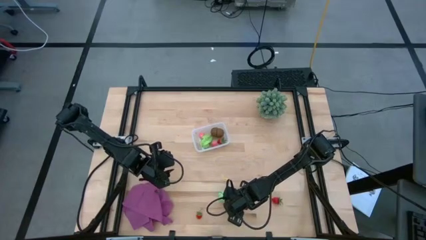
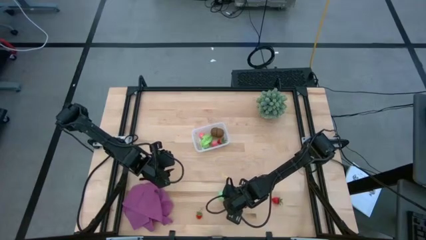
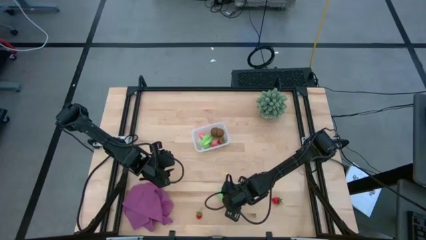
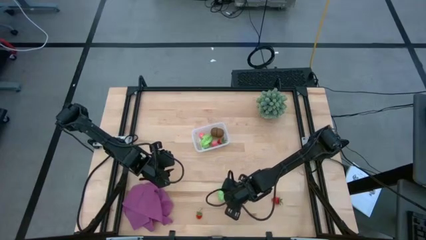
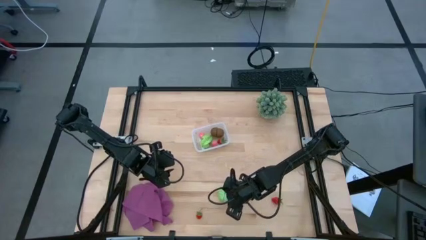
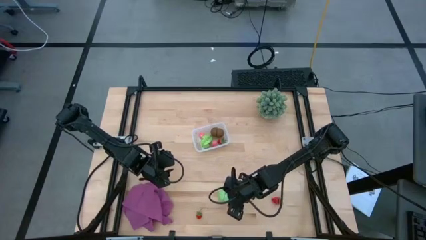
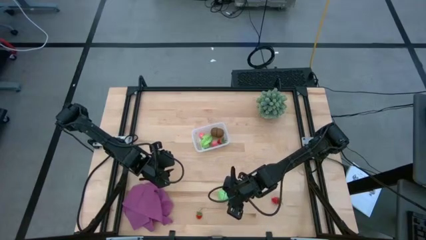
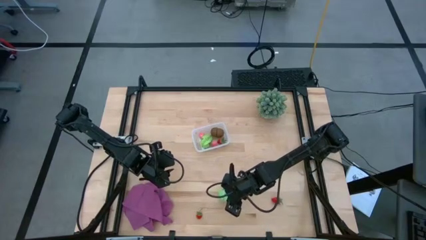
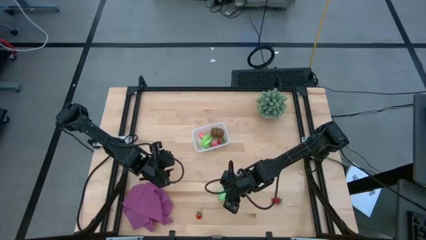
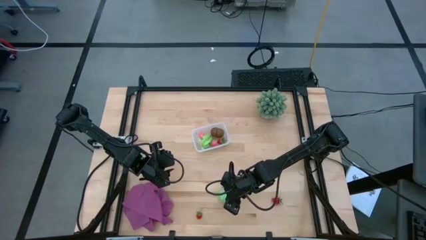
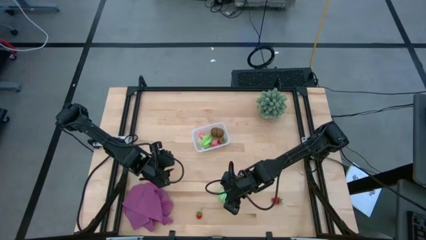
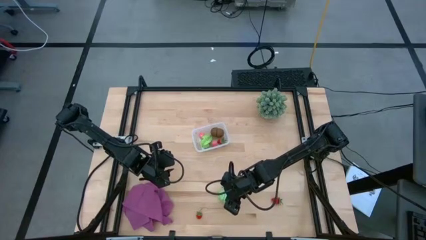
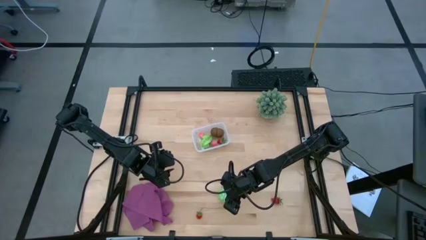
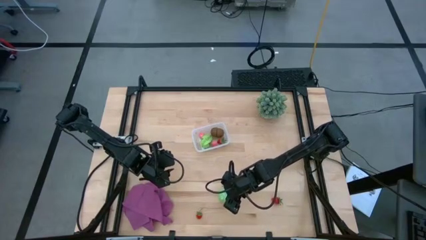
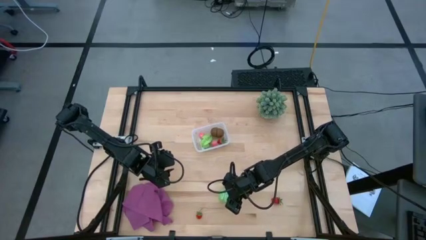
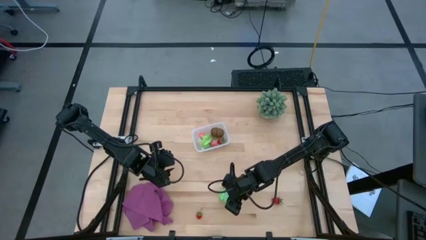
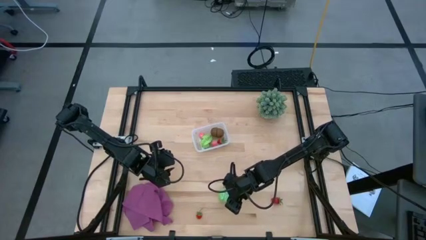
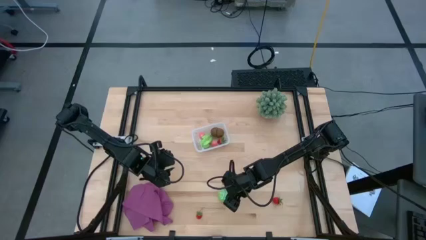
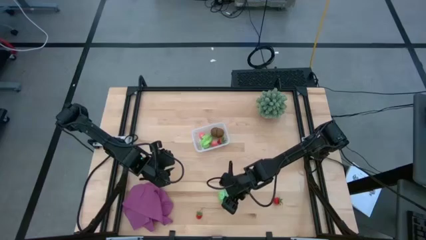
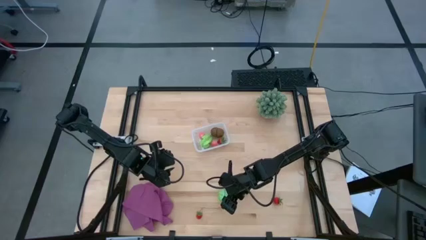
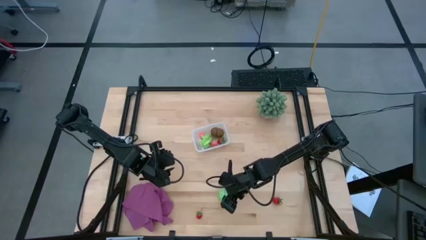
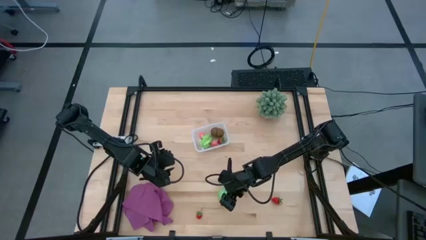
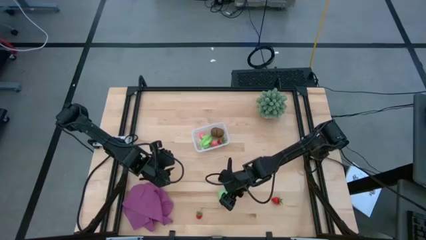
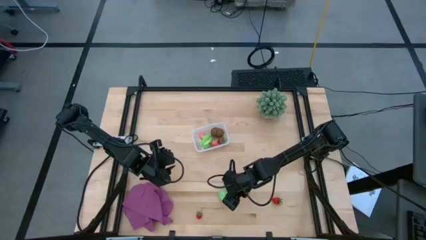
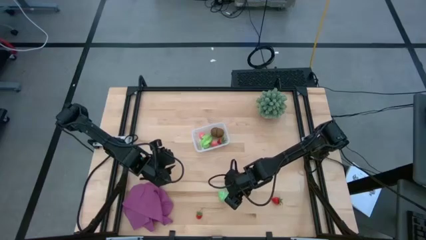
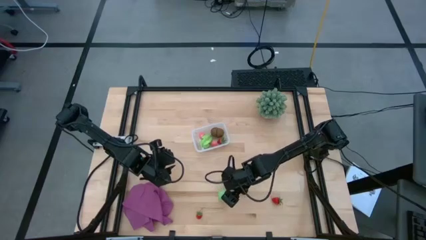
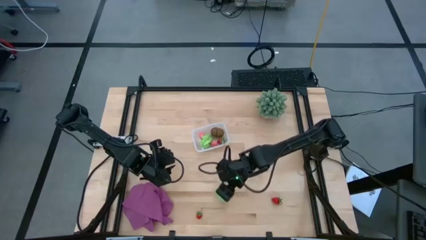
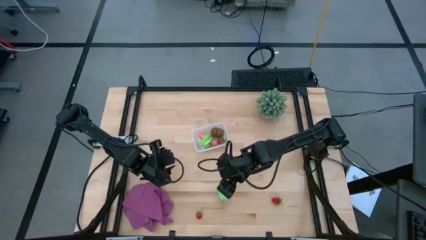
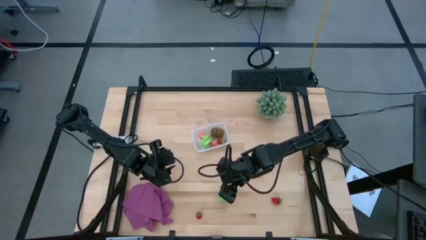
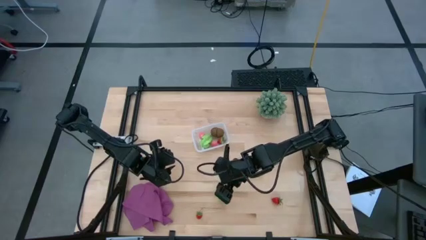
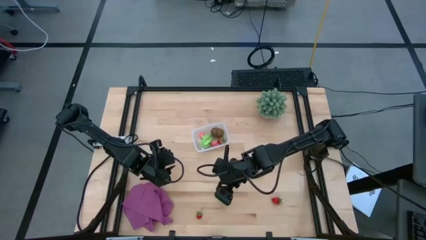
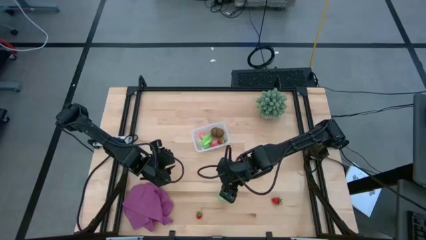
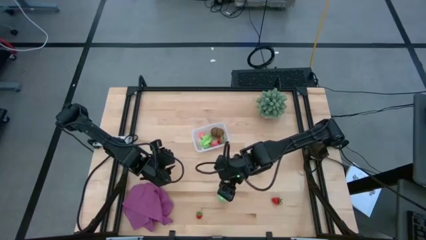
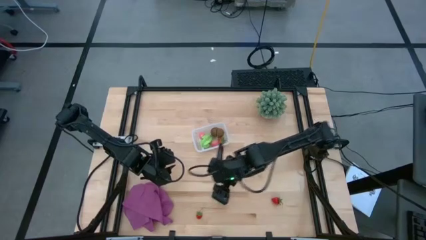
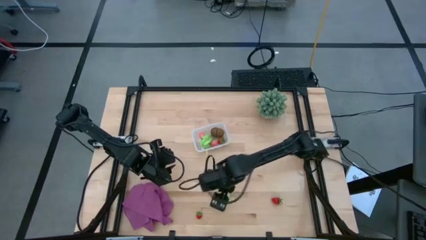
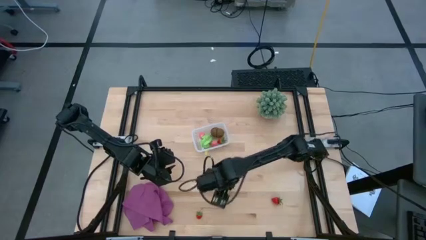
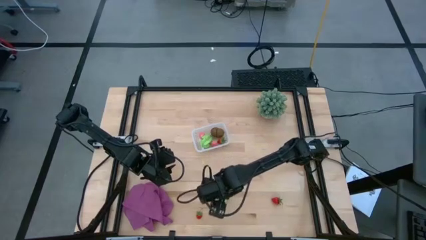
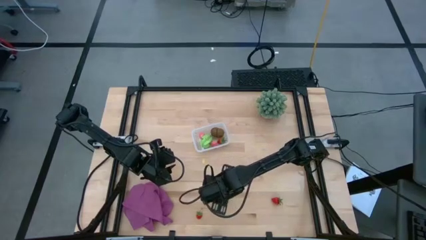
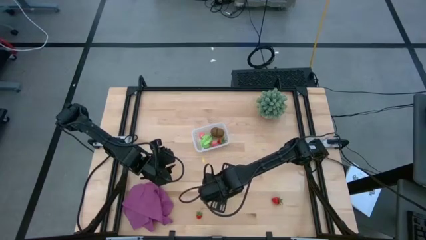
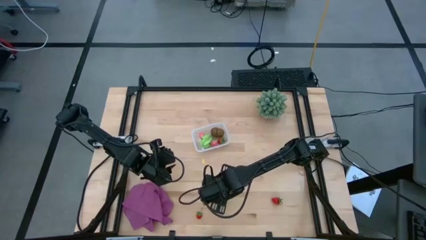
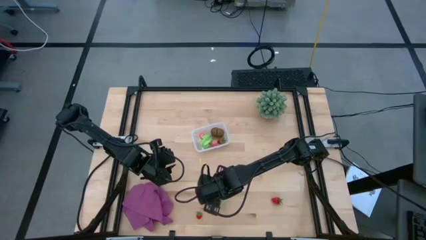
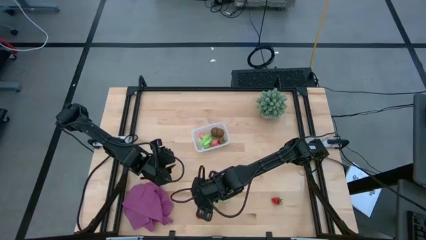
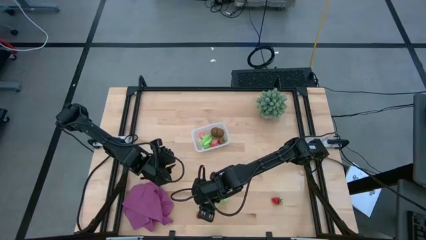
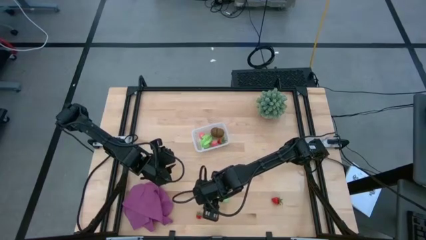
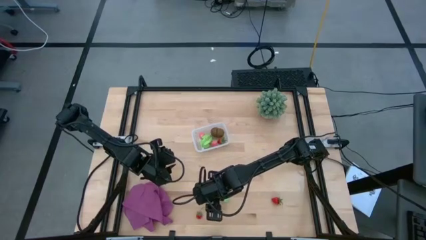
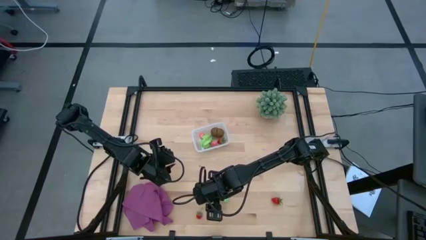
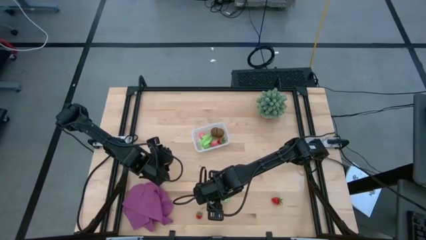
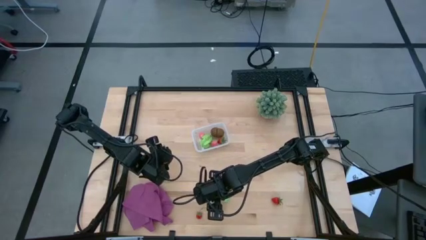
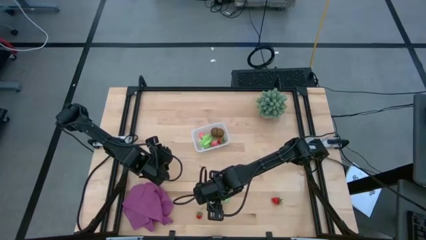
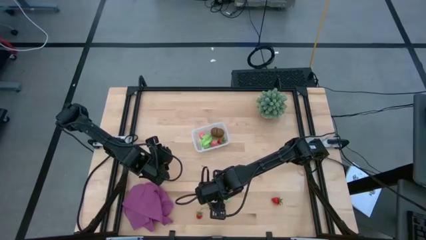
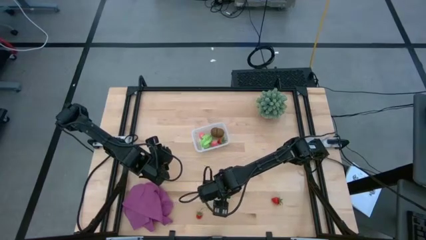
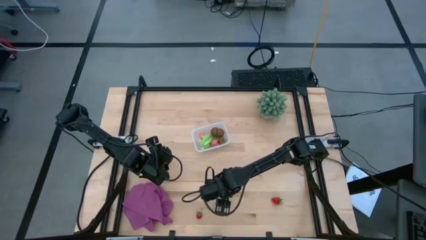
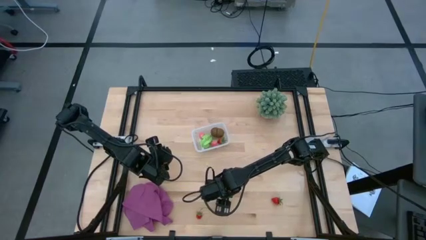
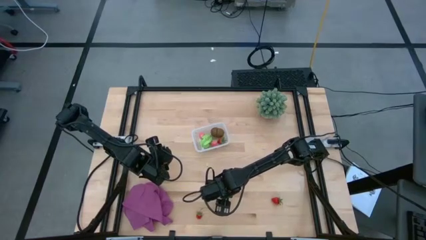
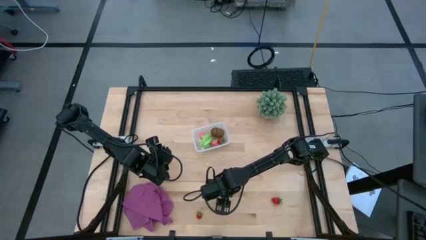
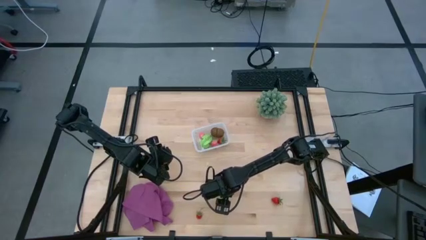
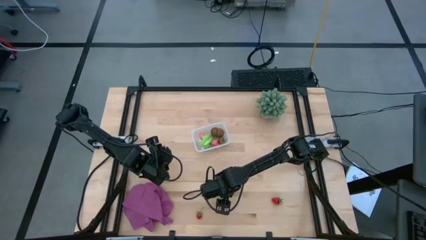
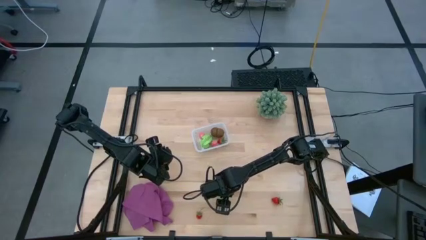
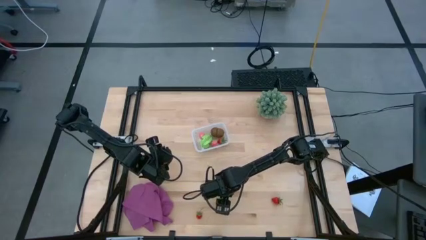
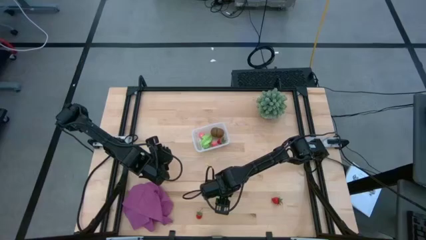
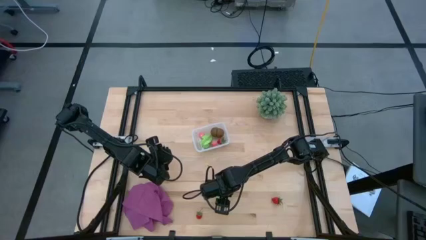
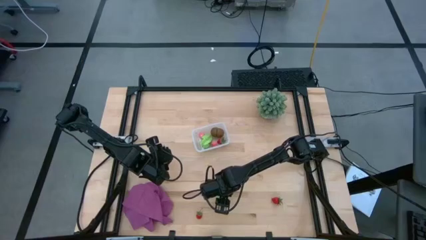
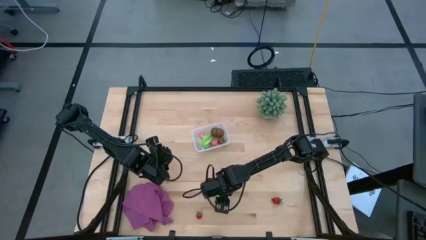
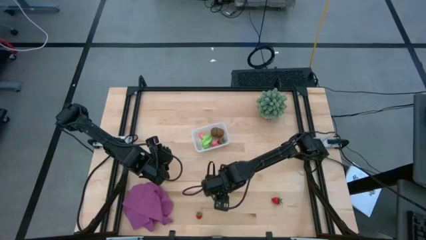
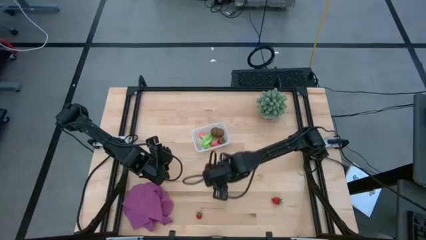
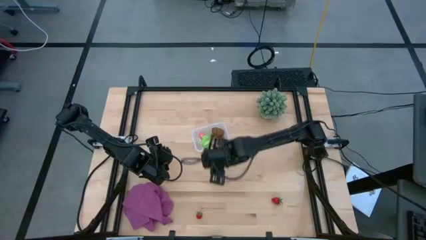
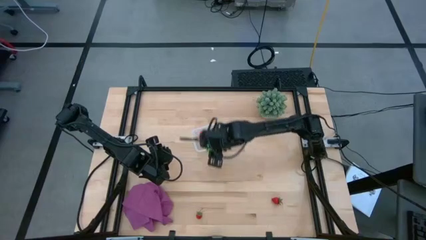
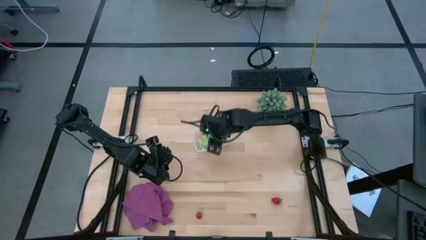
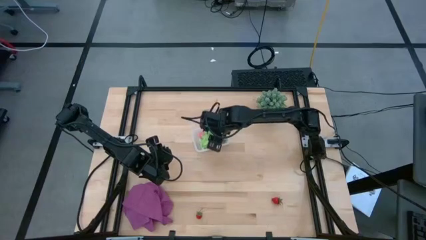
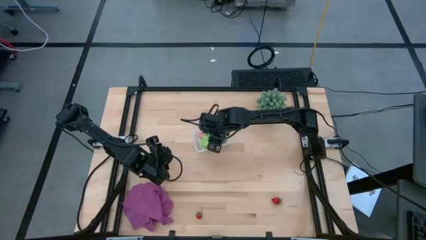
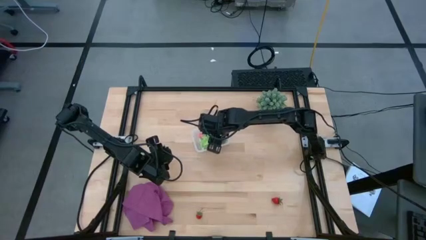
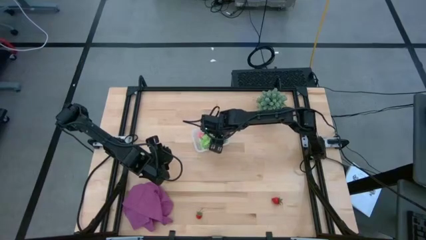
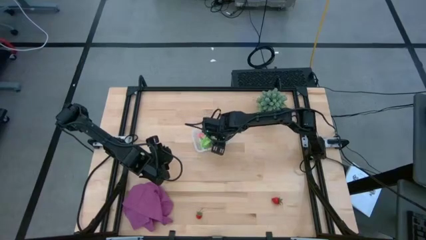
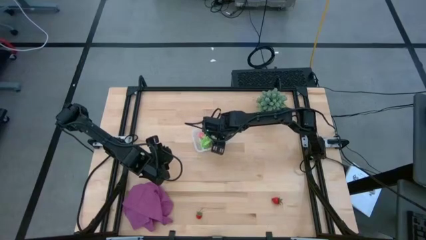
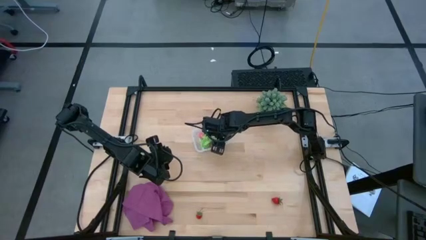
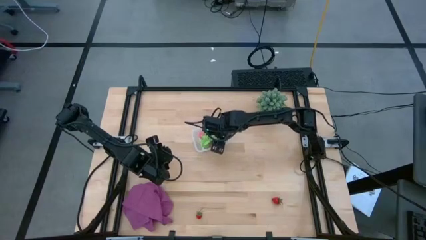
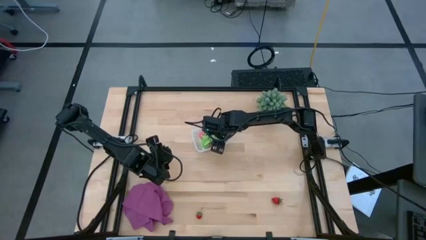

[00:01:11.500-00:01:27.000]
Task: Pick and placing Produce into tupperware
Put the green cabbage into the transparent container

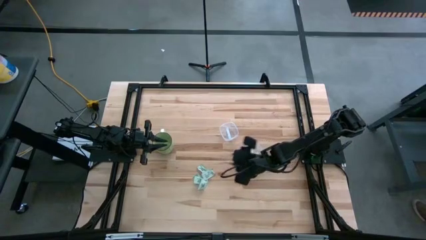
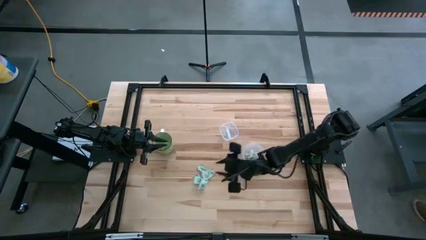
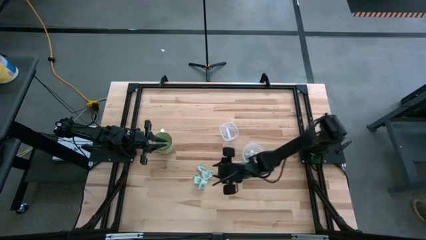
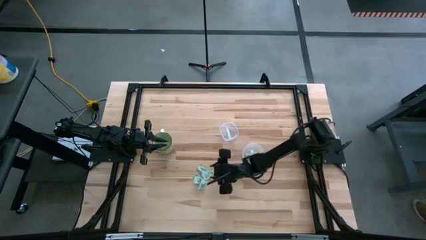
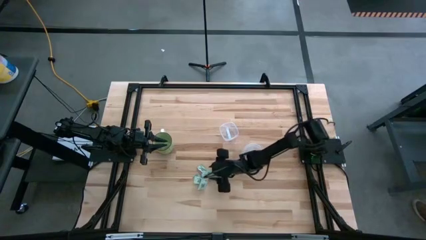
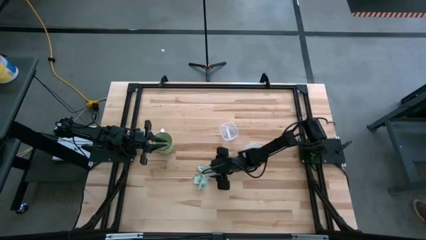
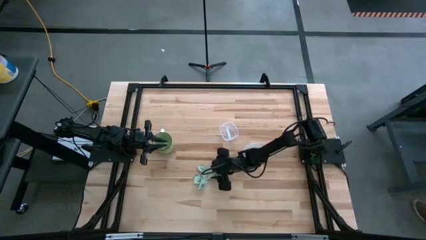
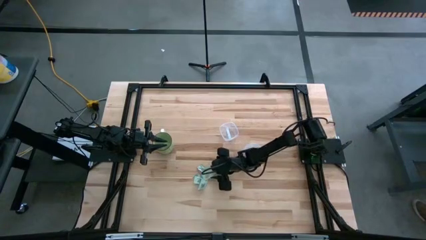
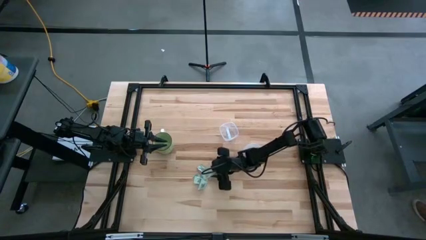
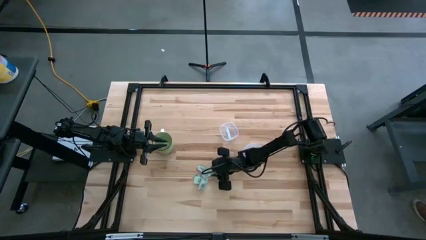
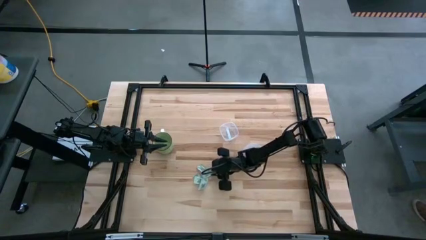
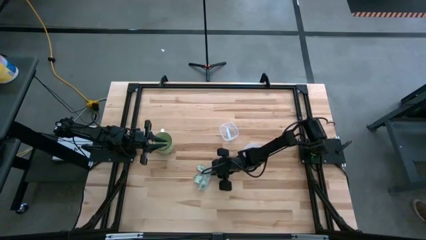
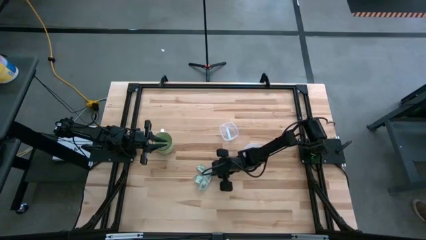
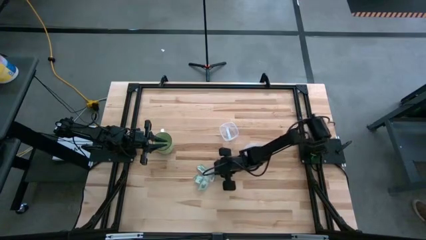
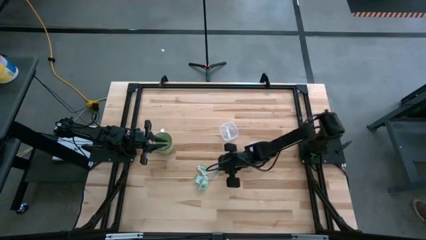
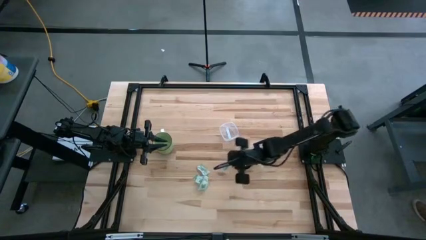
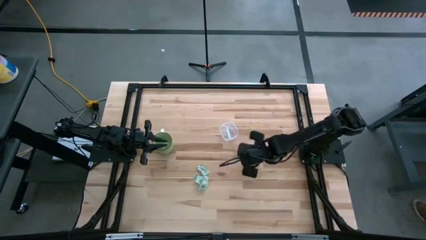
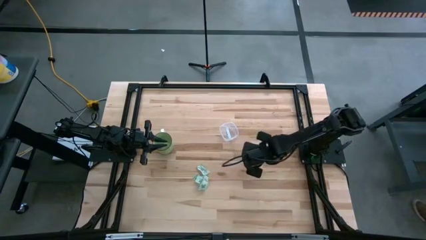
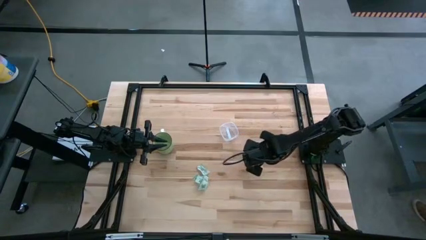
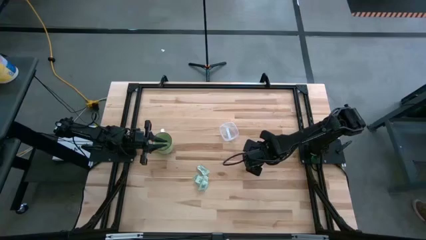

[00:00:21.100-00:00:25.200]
Task: Pick and place Stevia / Truvia into bins
Put the stevia packet into the bottom transparent container
